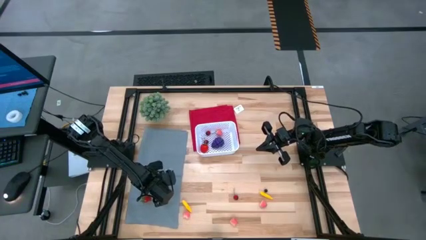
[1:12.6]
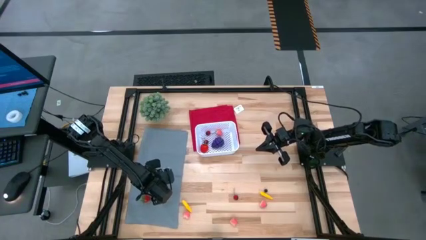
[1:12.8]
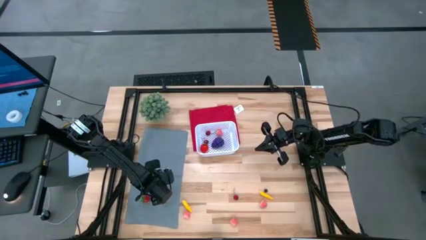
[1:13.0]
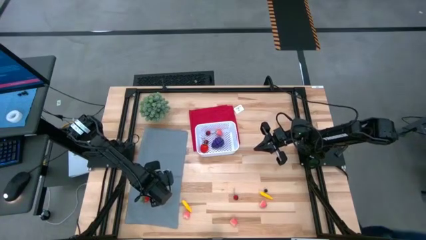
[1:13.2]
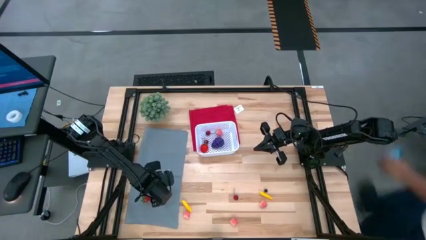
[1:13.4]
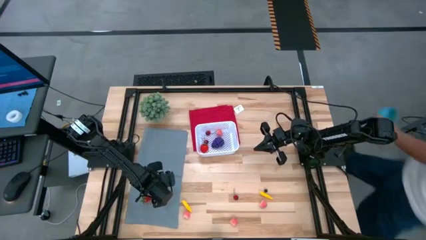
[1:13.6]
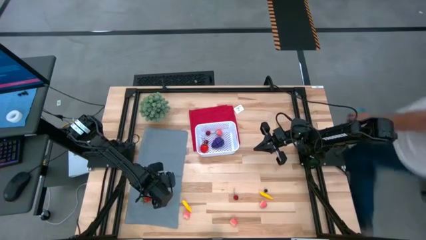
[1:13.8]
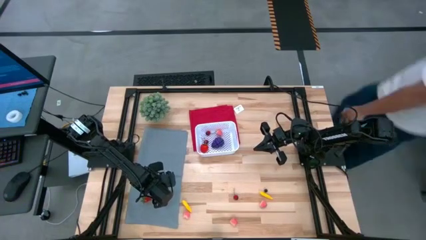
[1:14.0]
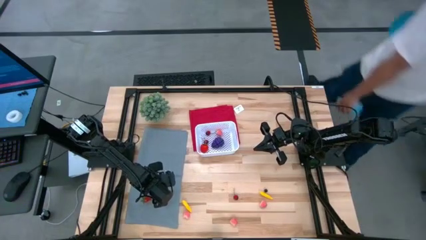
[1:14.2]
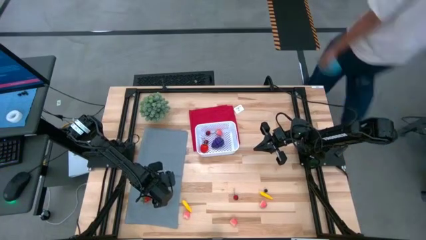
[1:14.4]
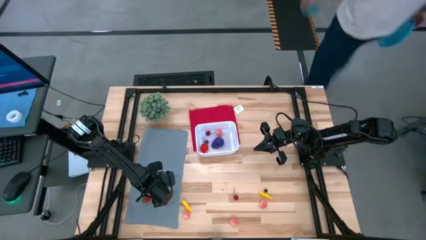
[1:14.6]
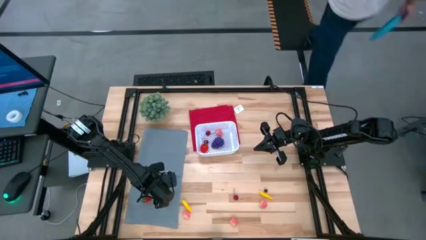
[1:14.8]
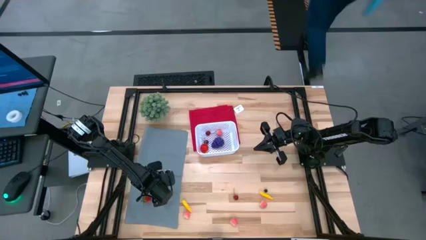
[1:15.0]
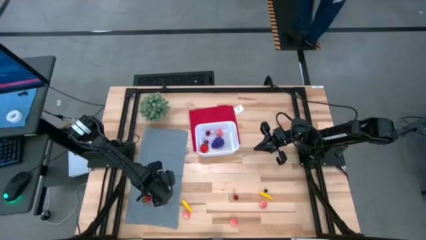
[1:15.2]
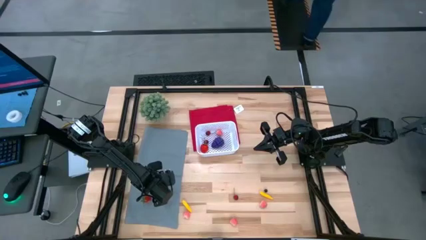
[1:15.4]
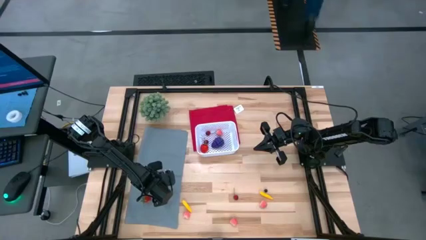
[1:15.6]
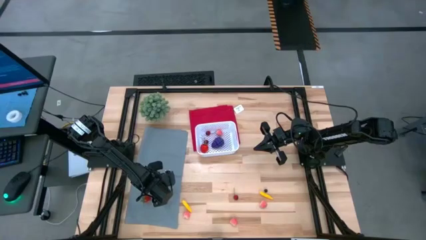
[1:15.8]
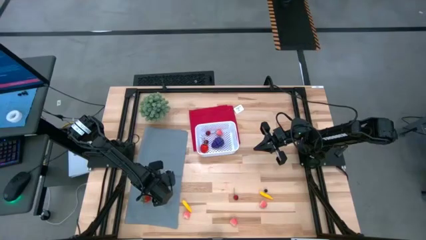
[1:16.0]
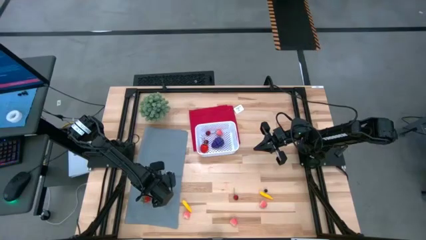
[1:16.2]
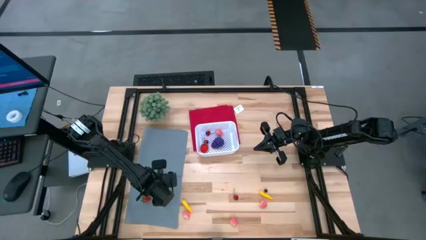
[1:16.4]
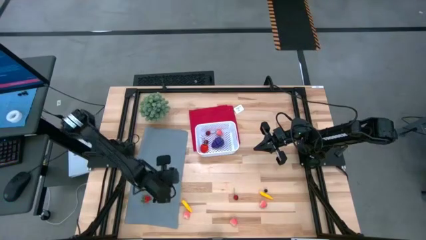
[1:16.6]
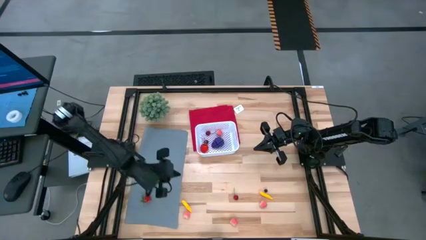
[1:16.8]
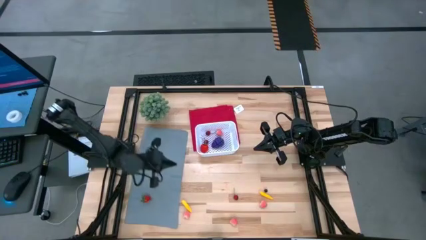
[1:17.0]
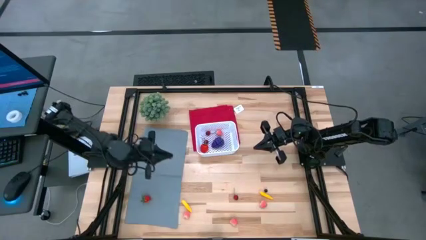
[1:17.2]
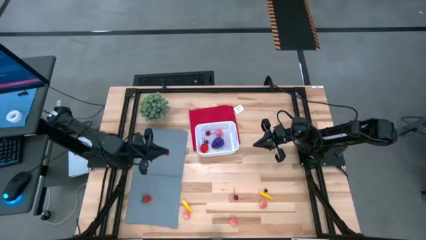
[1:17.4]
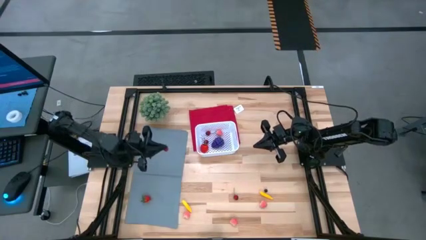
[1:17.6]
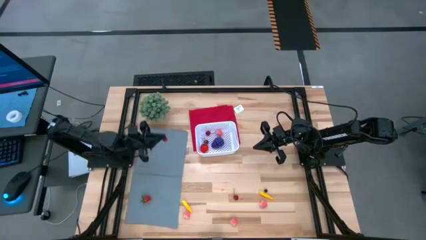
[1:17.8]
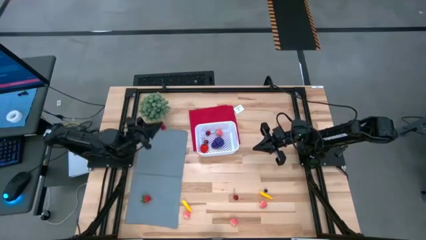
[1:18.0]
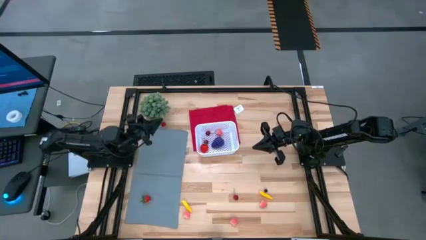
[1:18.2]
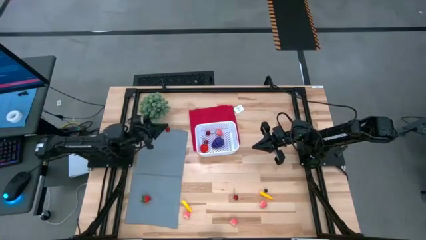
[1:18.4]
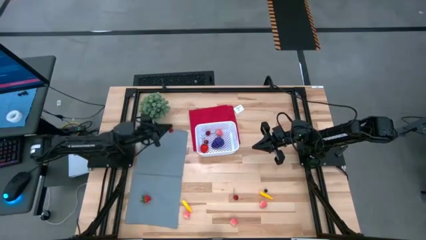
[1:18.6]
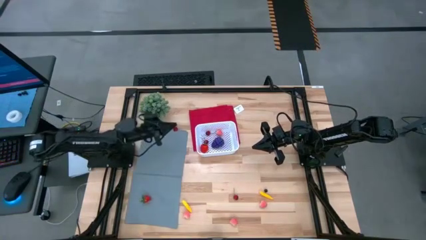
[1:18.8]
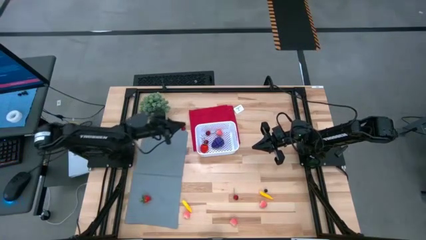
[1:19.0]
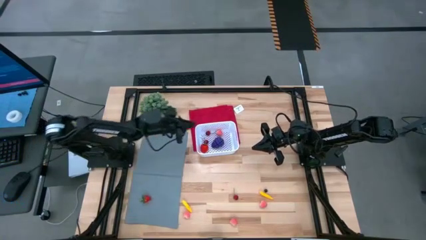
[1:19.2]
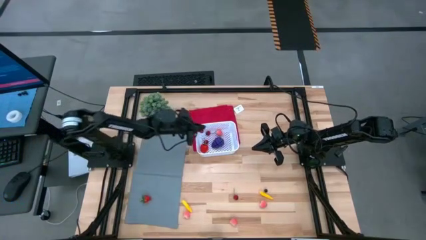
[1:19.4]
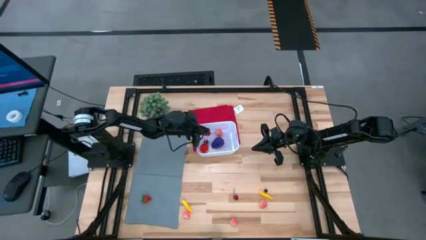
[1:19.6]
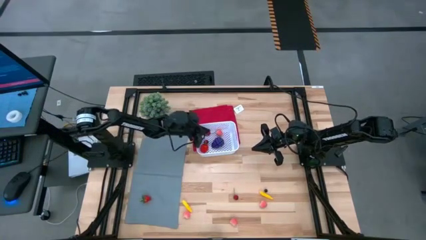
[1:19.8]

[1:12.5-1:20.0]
Task: Pick and placing Produce into tupperware
Put the red cherry into the white bin

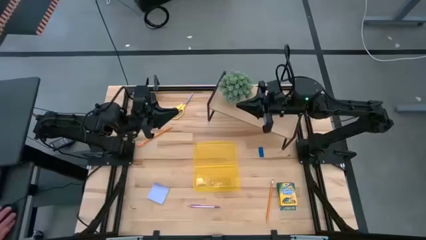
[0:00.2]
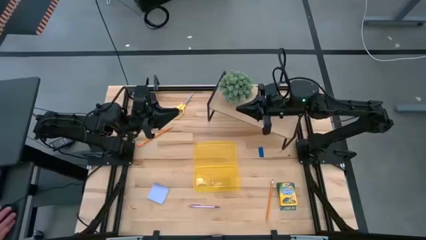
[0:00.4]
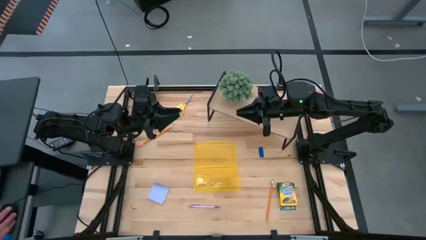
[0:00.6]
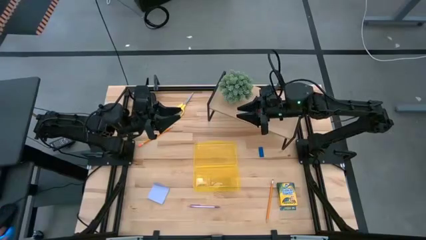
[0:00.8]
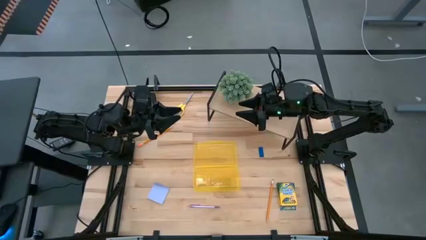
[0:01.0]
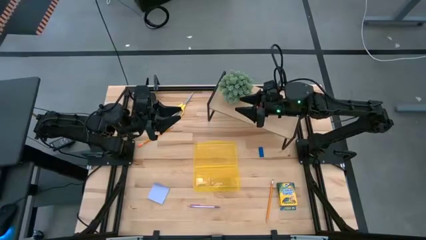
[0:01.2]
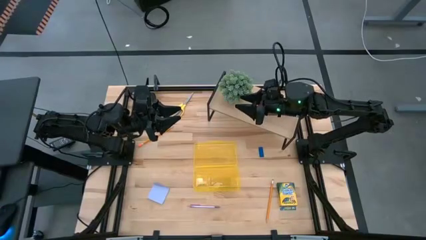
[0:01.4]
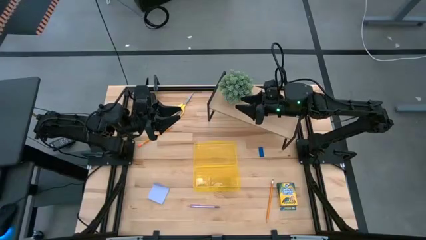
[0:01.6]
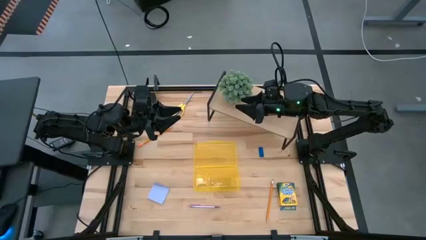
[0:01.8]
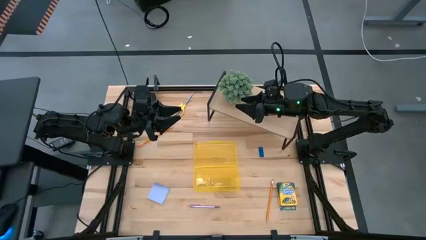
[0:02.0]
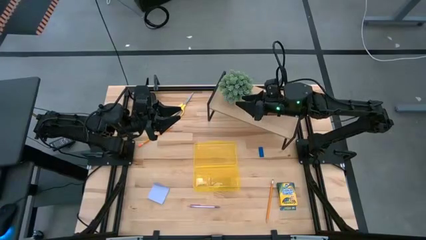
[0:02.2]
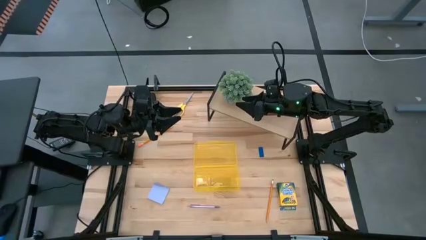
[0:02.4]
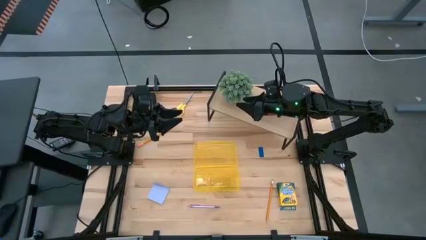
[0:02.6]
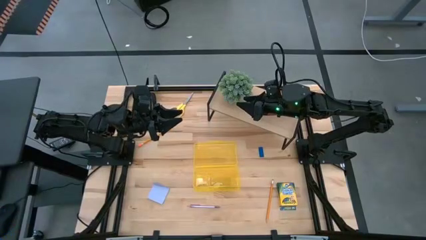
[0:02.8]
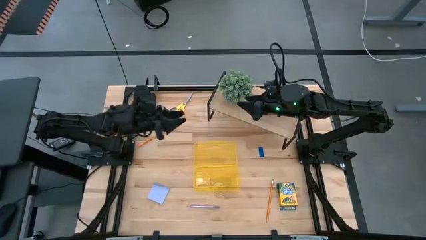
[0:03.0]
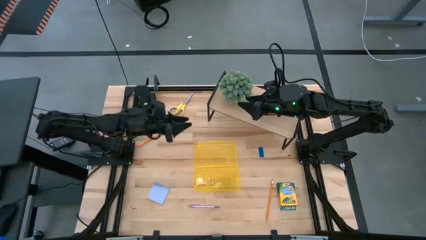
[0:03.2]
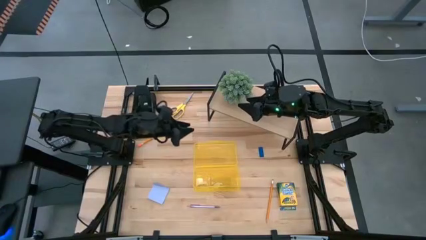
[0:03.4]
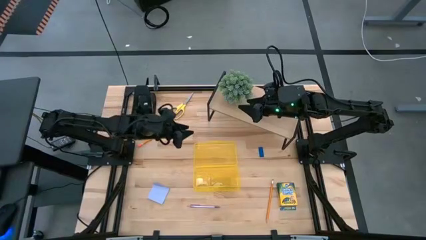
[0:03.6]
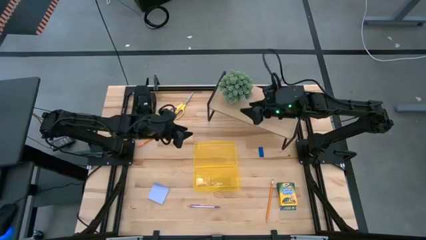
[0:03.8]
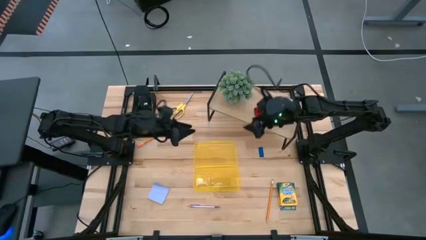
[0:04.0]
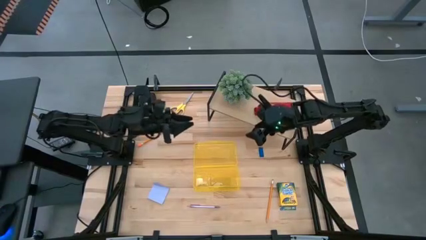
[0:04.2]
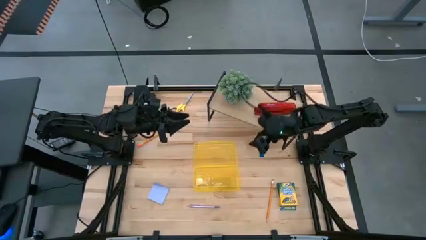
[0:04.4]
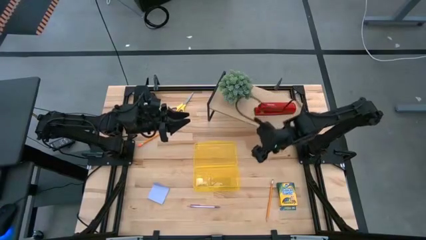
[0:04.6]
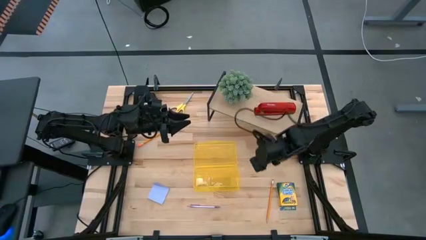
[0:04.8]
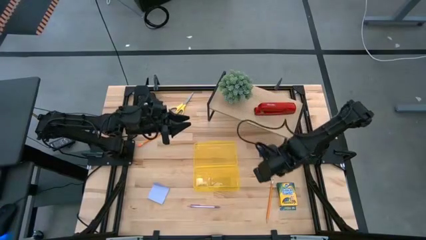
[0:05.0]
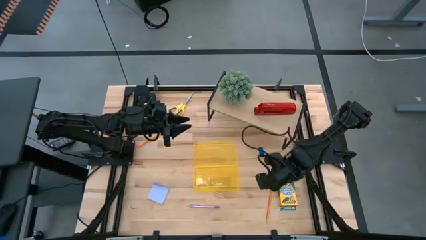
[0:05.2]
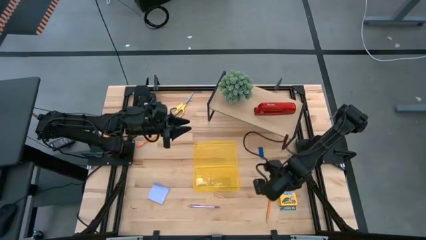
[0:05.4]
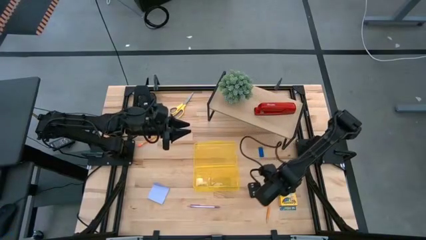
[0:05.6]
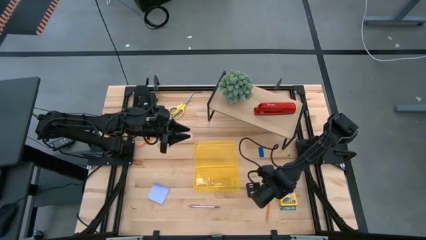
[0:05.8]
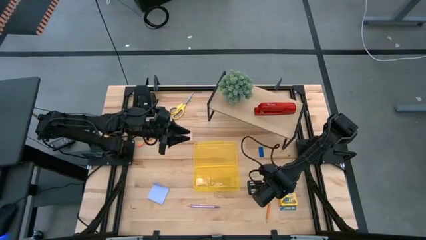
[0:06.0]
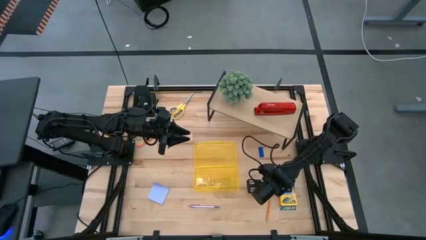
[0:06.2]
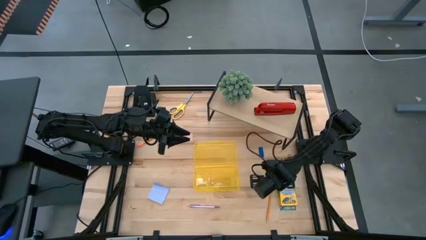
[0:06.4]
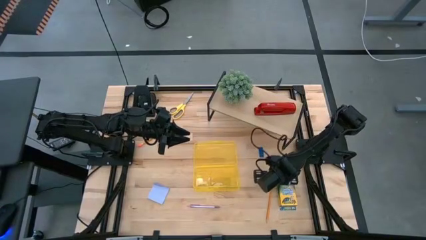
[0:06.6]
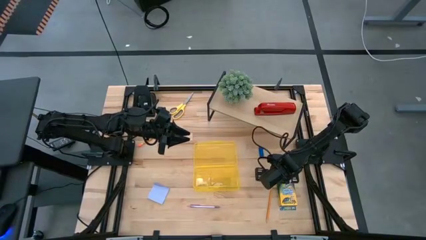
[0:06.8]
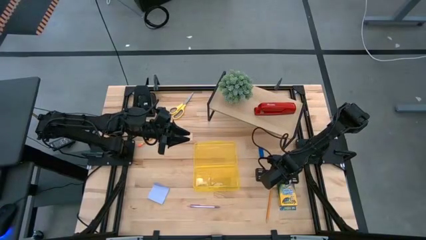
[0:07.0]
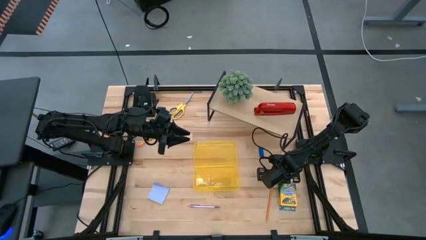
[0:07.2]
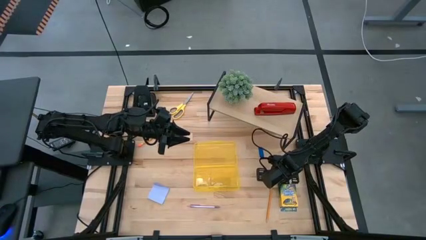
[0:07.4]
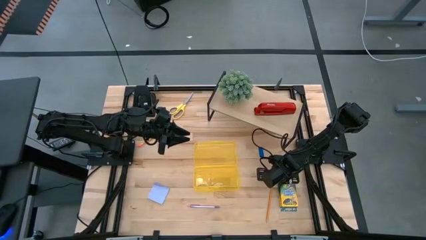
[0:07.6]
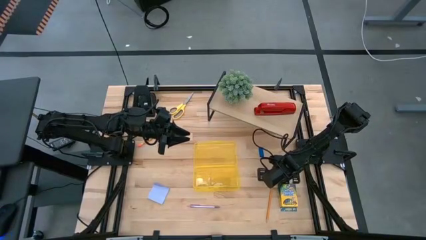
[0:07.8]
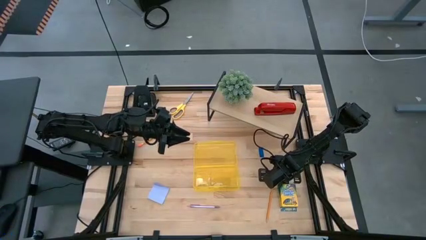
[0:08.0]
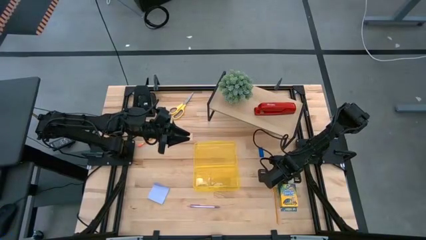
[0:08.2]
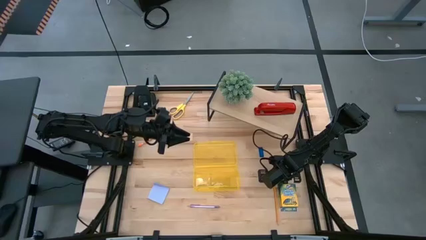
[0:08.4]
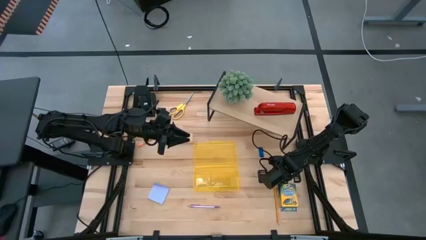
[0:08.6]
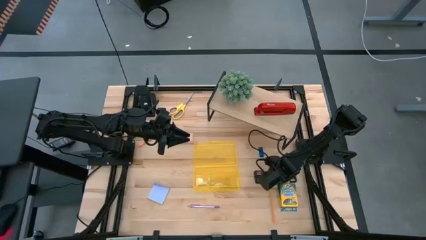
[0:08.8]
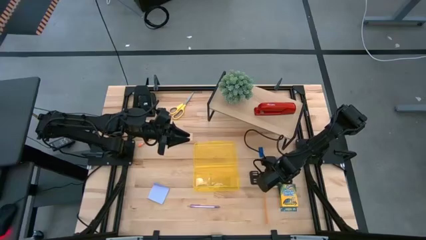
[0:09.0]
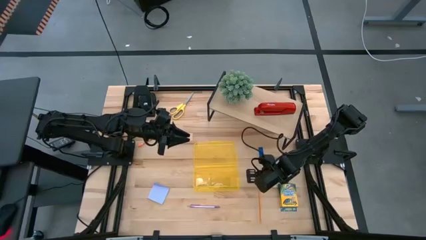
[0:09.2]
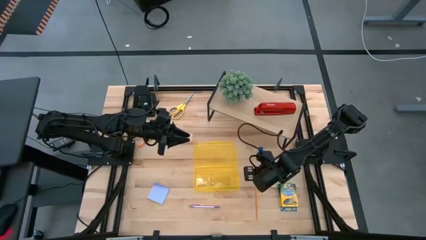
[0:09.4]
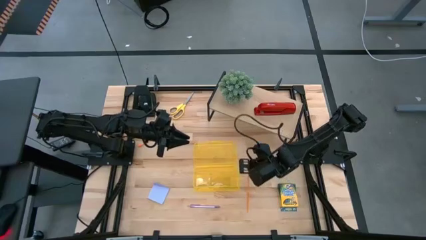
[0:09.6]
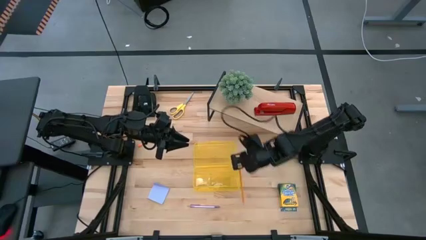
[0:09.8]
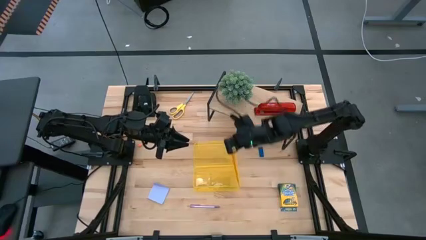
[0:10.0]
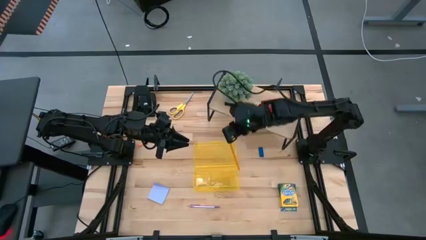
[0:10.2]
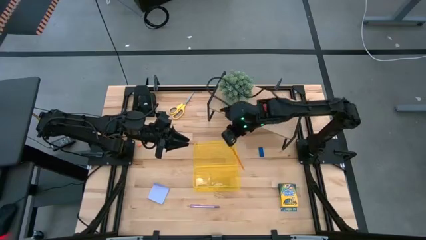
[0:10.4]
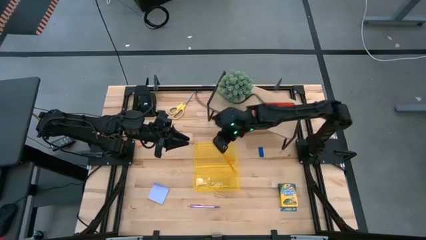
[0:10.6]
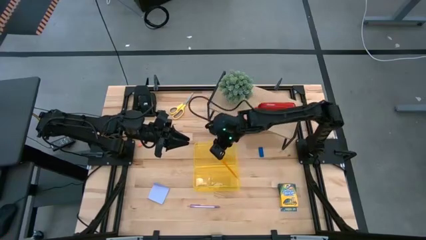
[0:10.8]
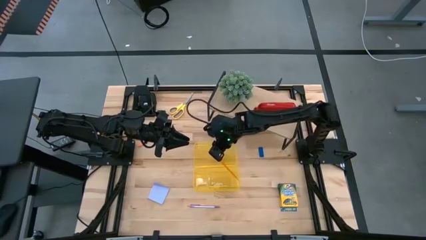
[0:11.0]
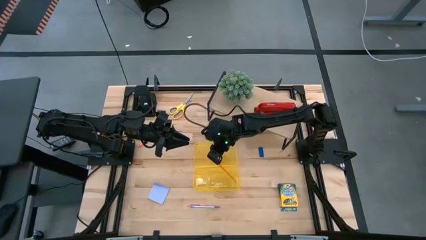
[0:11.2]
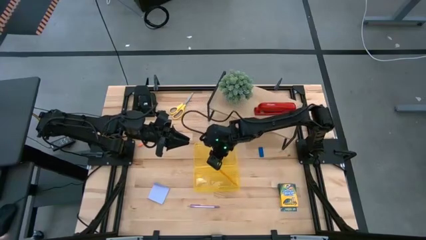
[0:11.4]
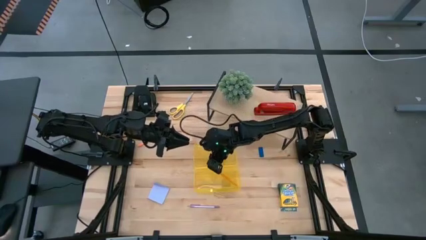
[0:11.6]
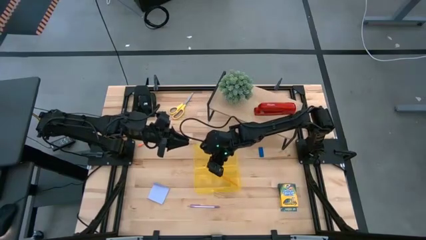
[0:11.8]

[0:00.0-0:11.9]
Task: Pack school essentials
Put the right pencil into the supply box
